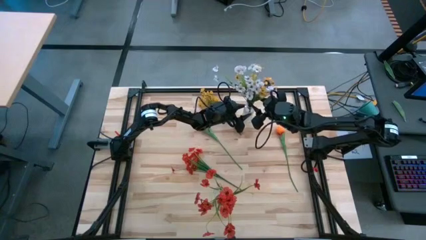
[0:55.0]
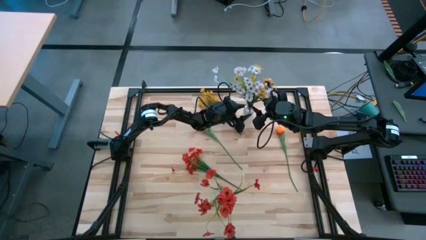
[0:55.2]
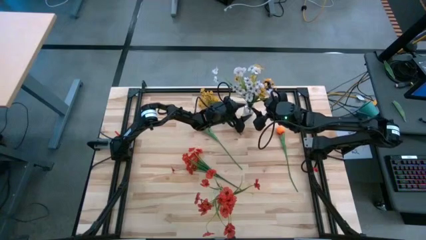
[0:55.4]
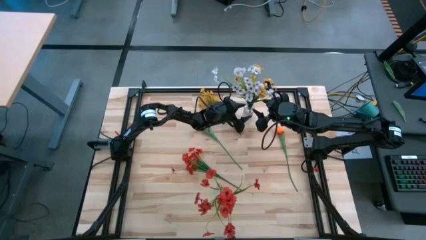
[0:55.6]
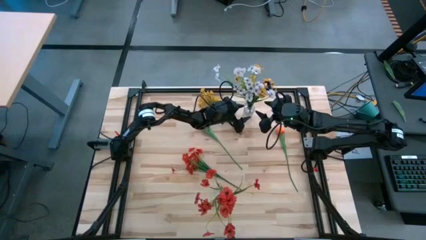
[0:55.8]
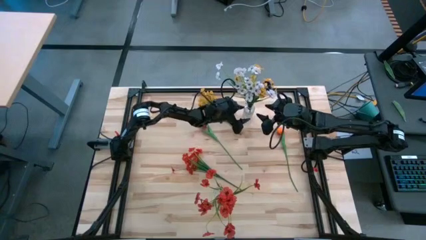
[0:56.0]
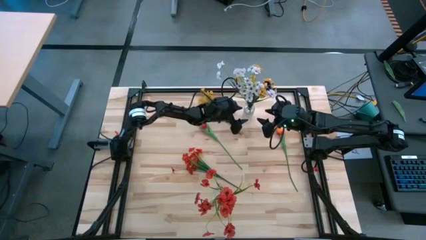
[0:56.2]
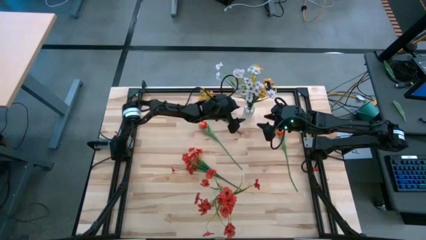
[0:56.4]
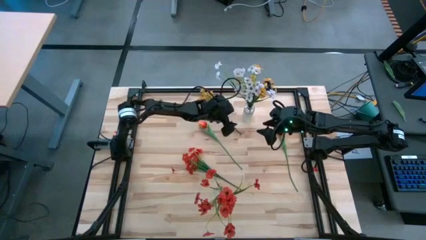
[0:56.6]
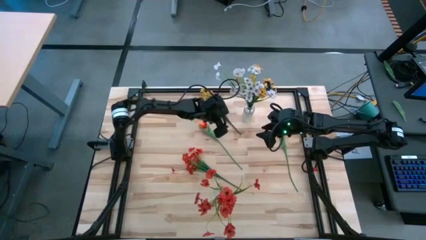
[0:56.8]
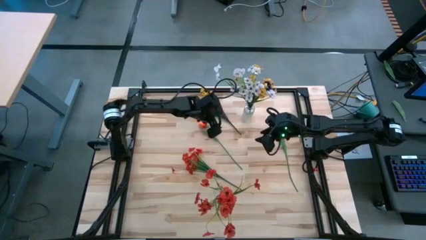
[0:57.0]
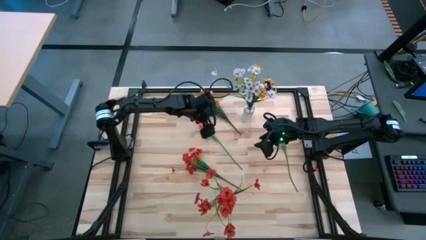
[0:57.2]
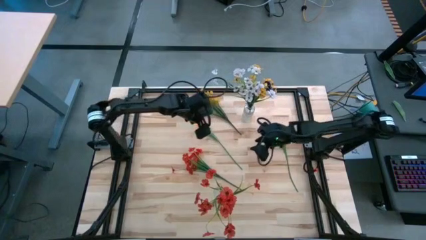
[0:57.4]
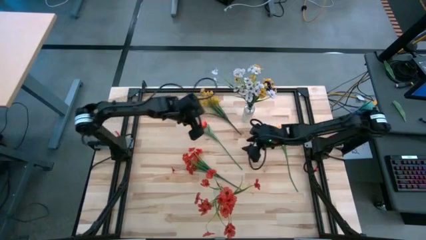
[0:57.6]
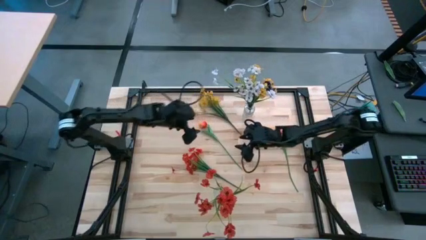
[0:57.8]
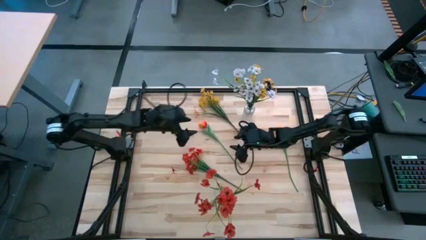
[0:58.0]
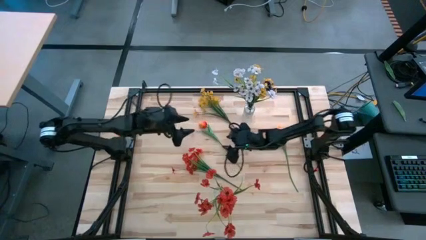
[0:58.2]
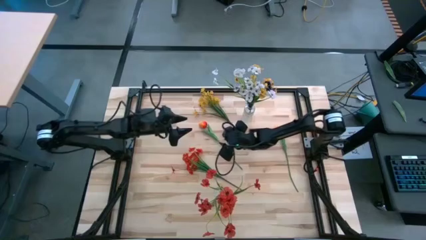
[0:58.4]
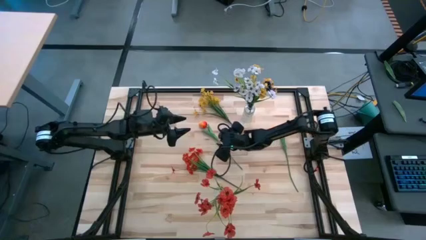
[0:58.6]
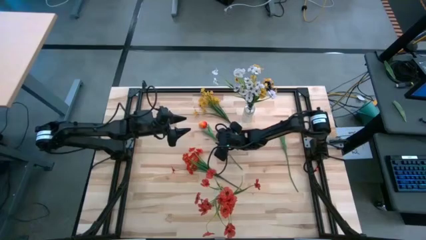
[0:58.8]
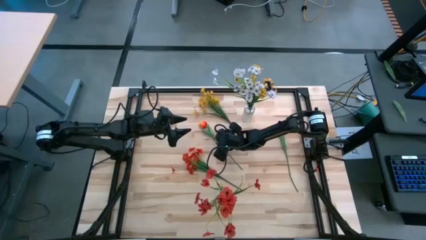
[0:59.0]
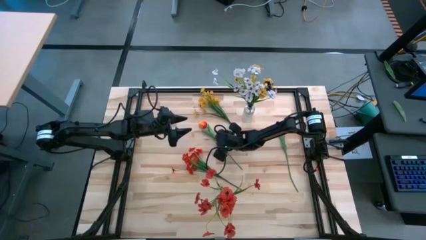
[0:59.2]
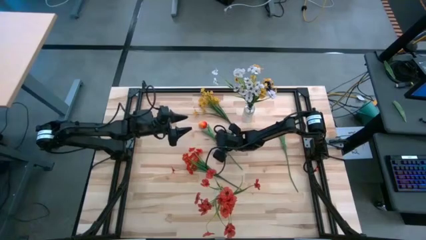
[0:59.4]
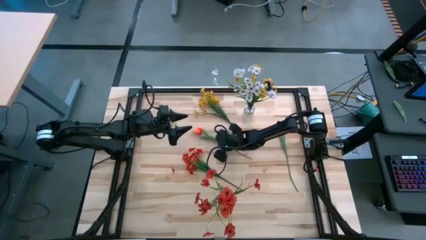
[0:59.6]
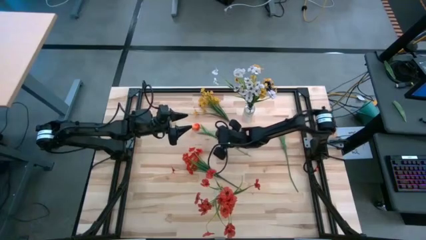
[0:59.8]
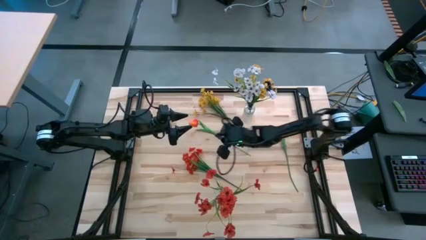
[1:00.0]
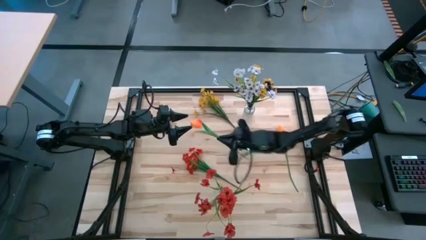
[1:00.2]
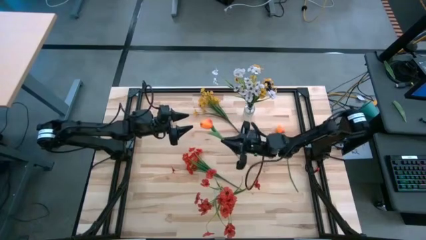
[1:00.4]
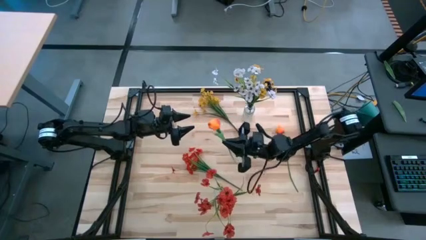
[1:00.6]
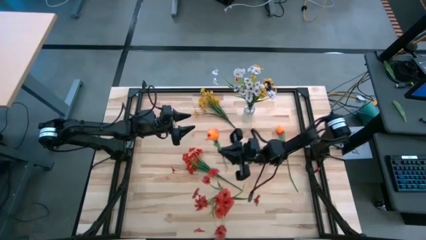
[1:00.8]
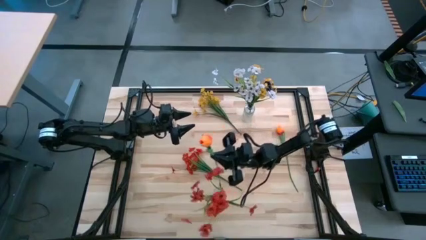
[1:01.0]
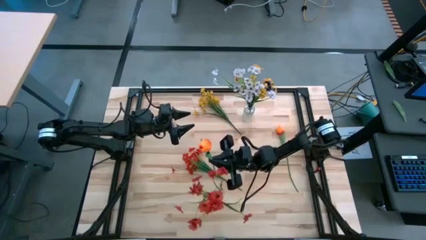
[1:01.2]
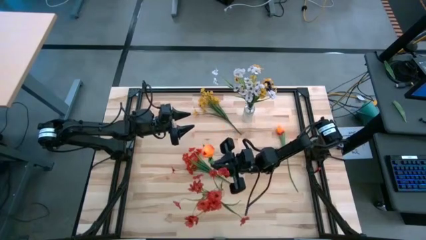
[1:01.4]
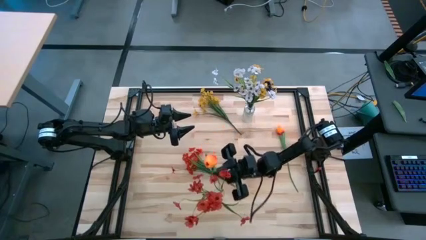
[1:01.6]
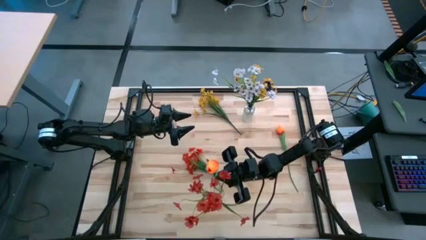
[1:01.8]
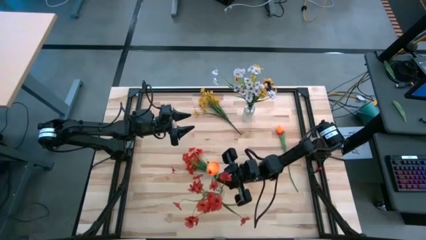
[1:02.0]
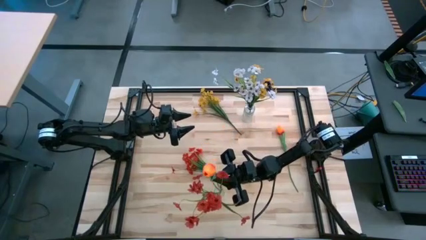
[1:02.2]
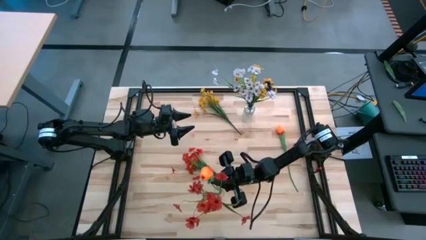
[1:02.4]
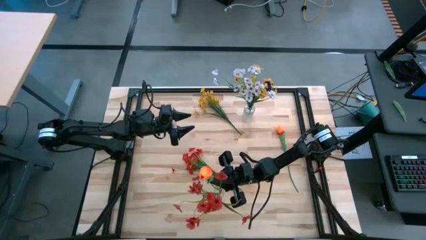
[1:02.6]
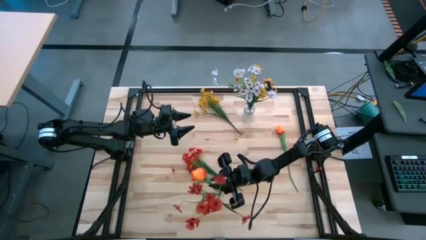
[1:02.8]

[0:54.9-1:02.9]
Task: Sort flowers into vase by color
Put the left orange flower into the bottom transparent vase

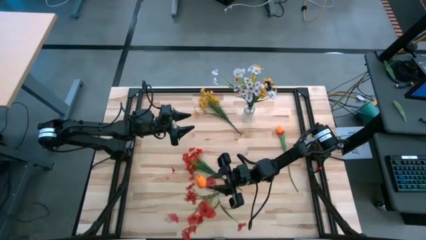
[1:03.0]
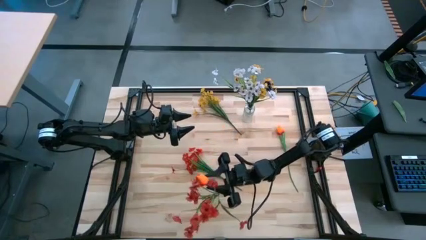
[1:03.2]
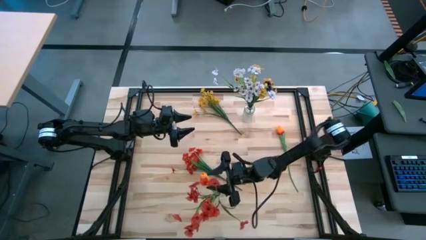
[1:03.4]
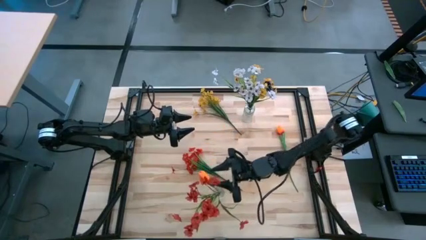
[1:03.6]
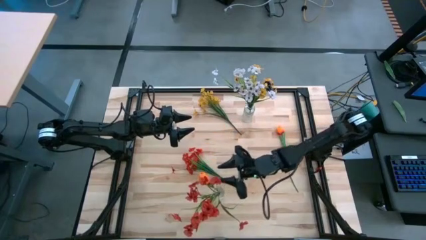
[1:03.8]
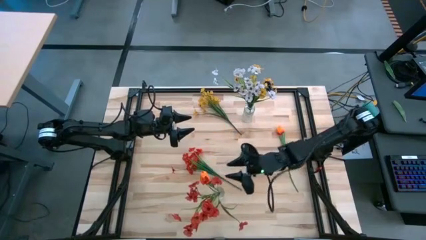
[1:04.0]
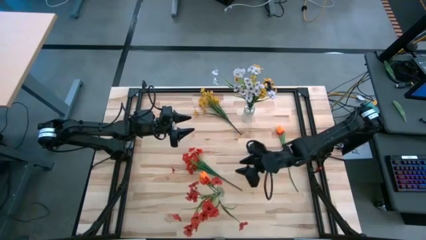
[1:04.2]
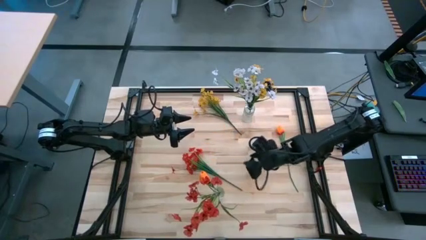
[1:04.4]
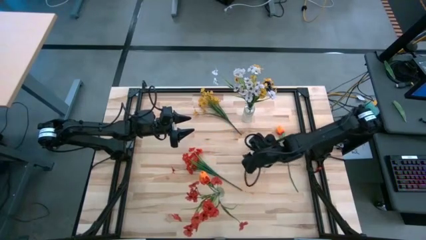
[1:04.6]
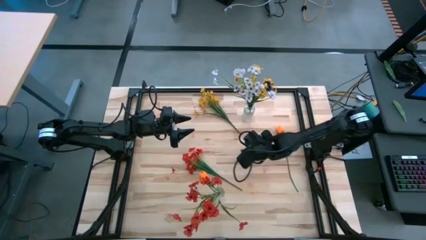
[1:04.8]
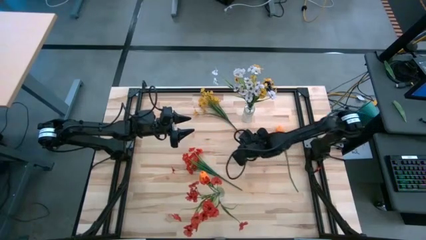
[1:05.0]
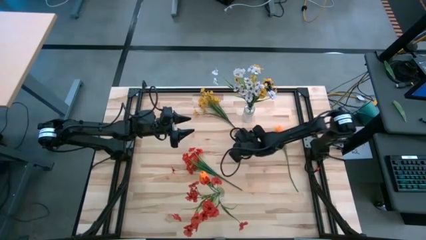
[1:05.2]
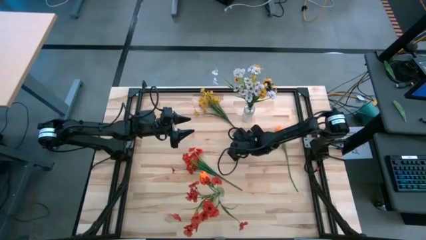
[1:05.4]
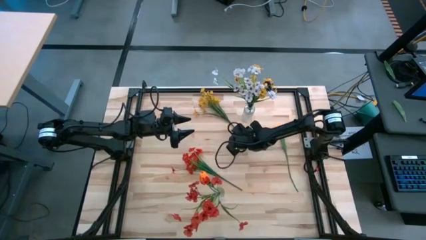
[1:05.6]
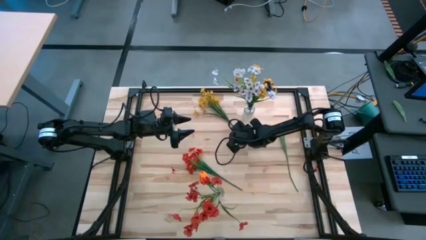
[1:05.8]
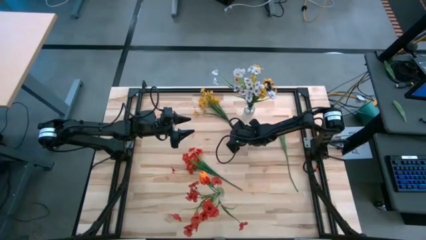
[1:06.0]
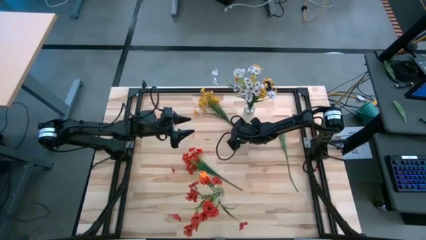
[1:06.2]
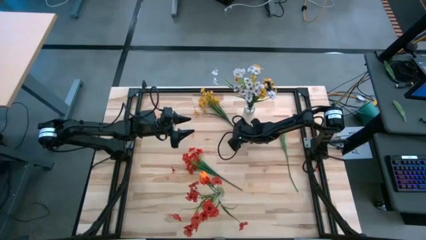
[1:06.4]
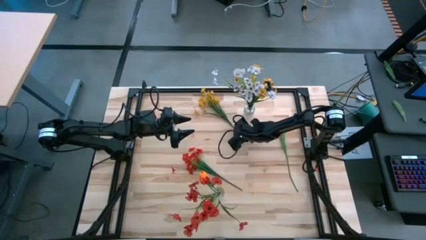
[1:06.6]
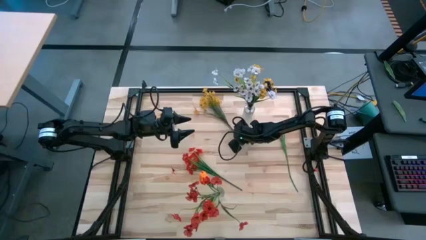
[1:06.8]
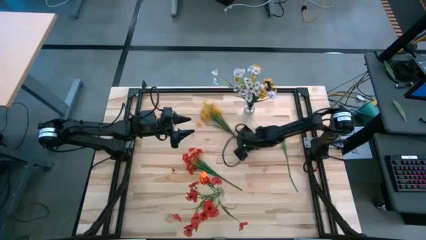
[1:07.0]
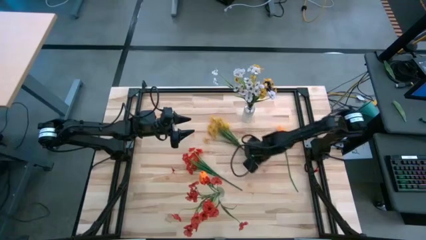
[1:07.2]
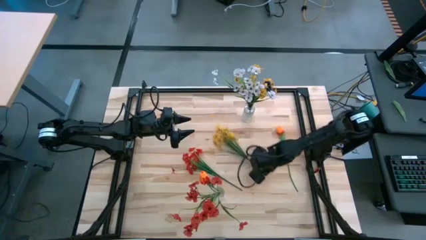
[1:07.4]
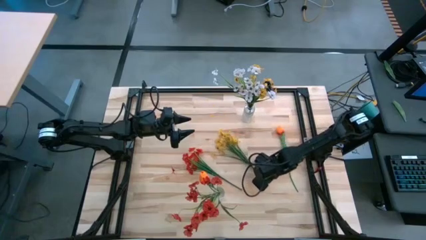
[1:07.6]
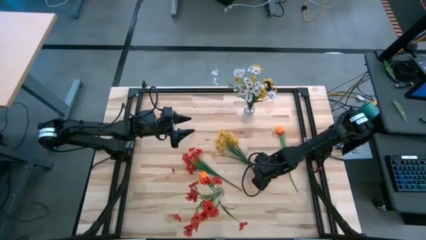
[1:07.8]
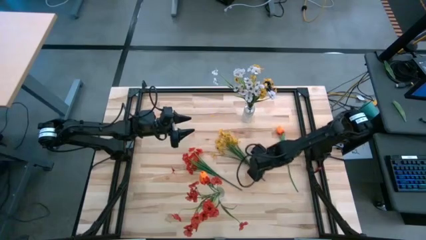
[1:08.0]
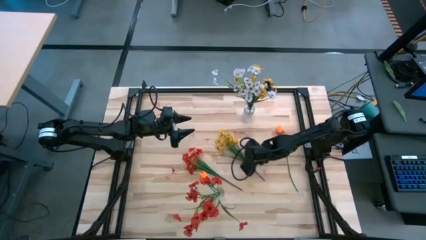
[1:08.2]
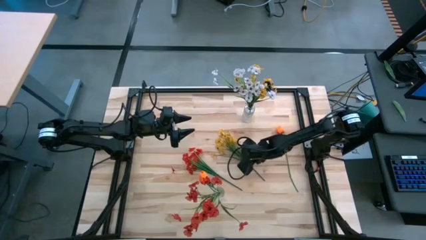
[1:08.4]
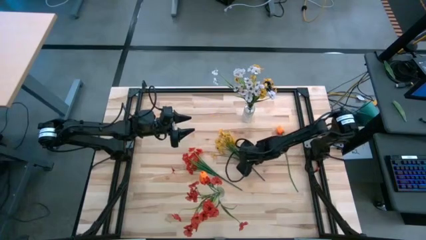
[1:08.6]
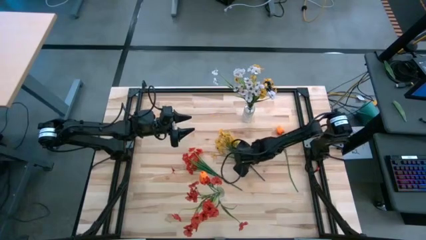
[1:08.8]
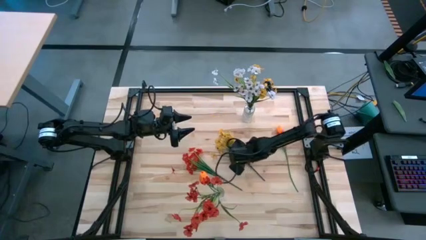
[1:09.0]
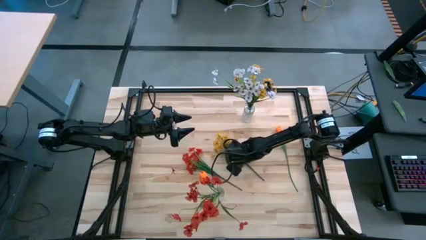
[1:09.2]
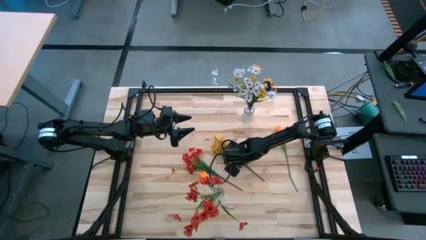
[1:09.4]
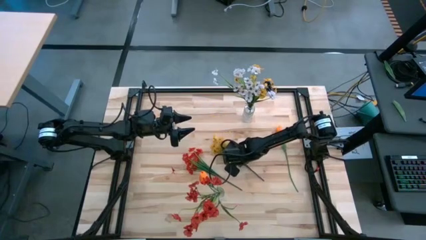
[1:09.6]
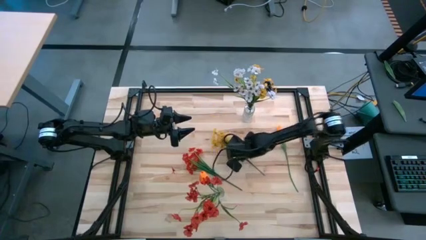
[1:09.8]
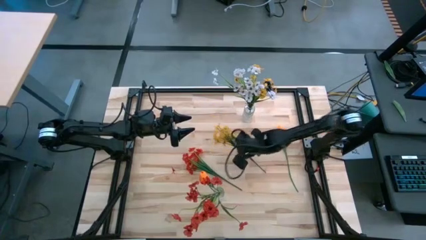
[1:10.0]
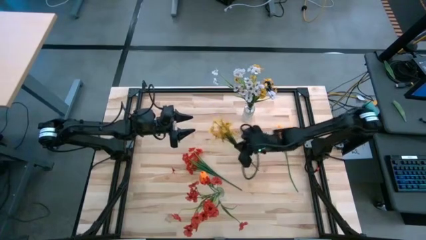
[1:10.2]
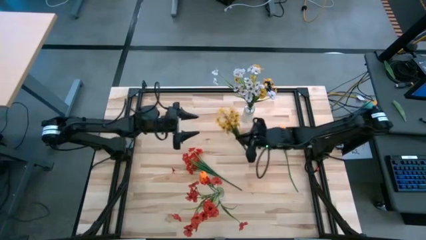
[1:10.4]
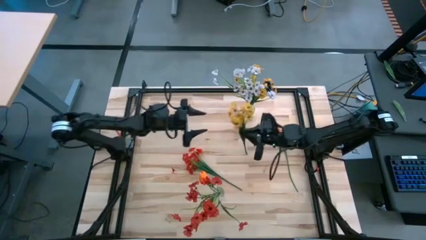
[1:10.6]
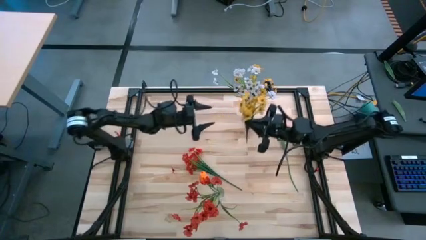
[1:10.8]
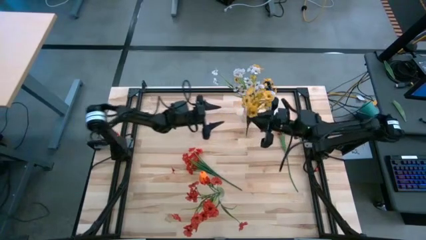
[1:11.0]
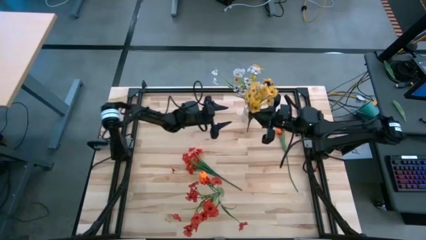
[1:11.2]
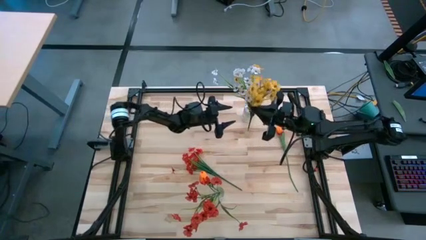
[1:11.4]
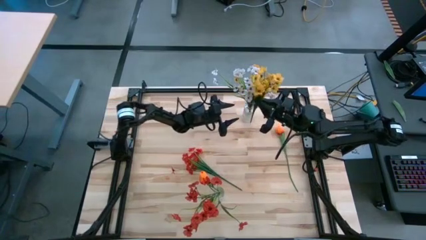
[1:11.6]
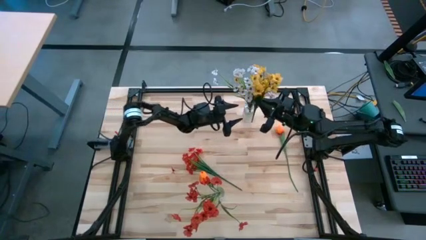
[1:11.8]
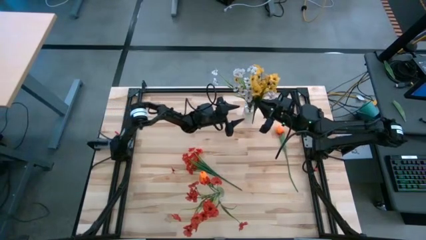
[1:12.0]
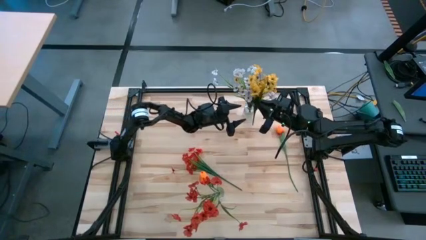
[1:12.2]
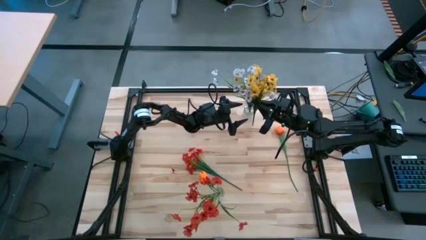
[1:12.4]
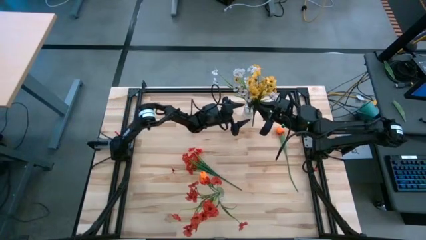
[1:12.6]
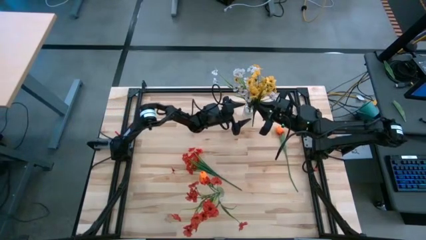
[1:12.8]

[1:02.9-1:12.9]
Put the yellow flowers into the top transparent vase
